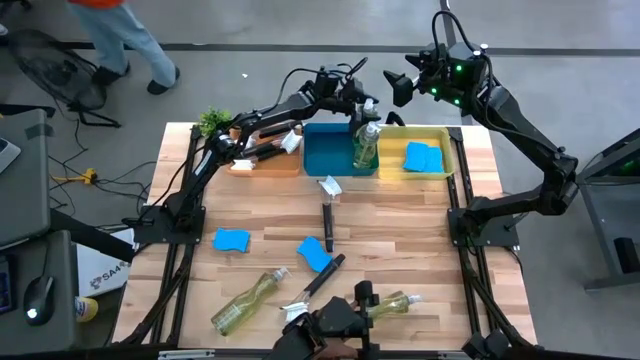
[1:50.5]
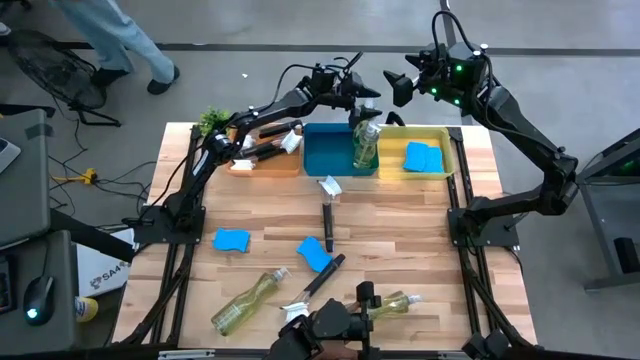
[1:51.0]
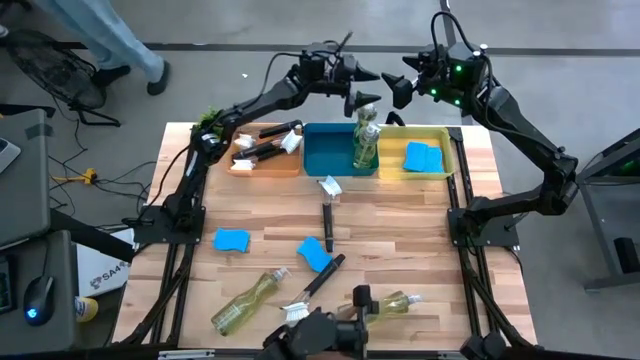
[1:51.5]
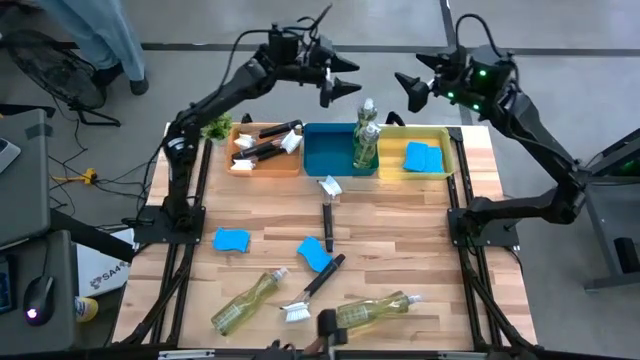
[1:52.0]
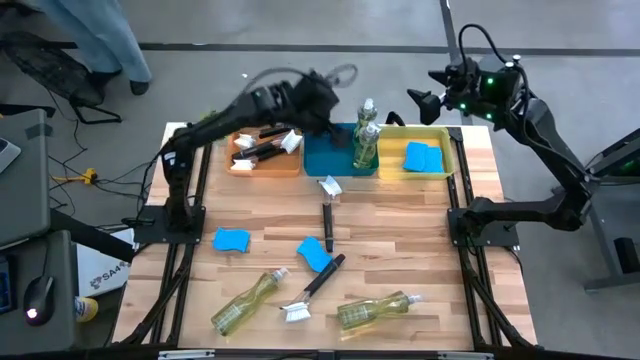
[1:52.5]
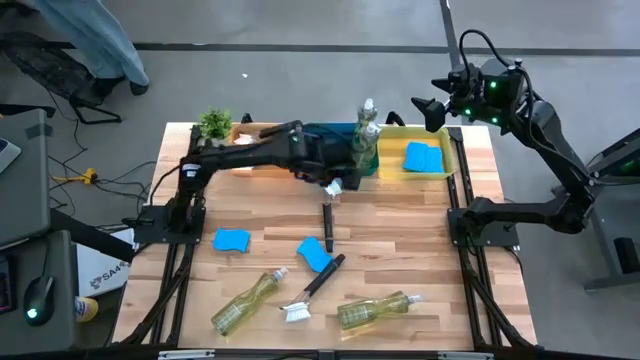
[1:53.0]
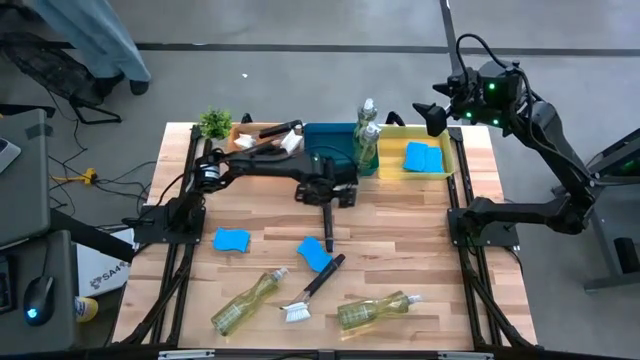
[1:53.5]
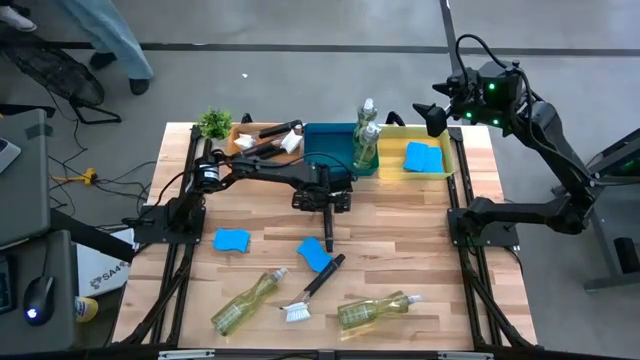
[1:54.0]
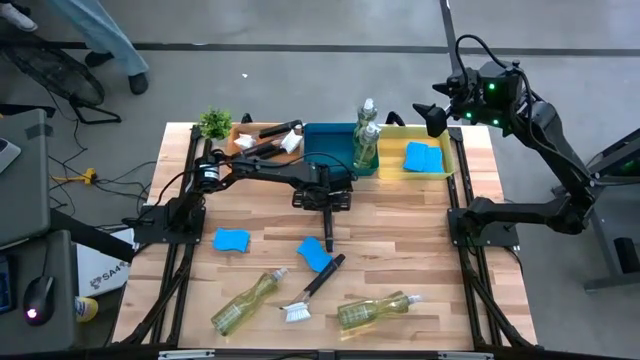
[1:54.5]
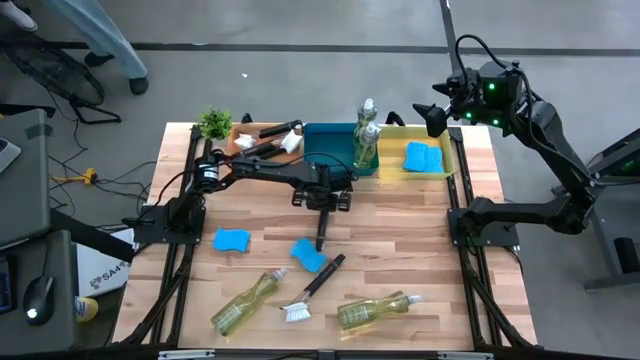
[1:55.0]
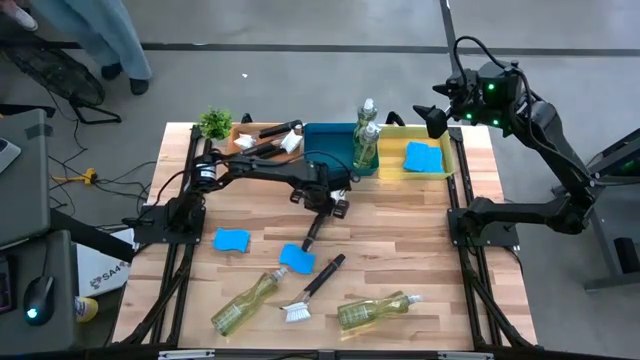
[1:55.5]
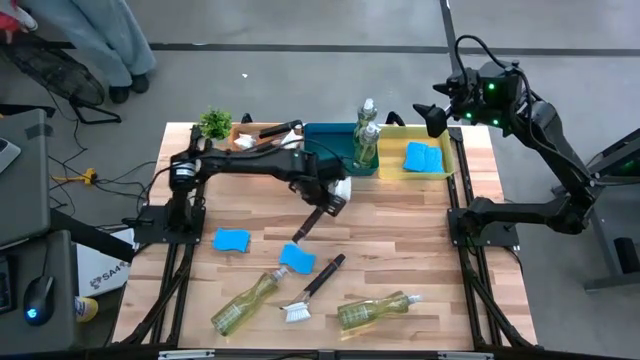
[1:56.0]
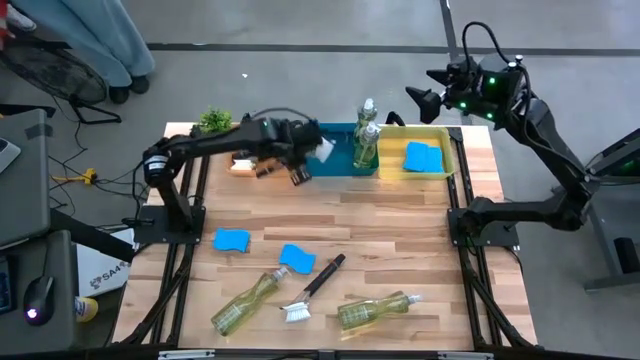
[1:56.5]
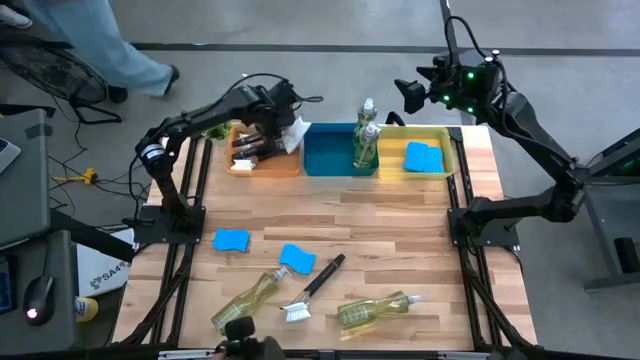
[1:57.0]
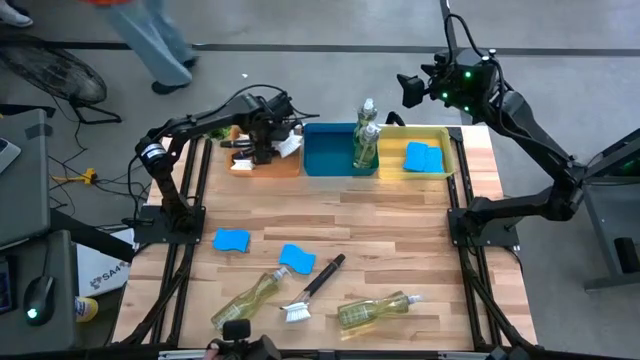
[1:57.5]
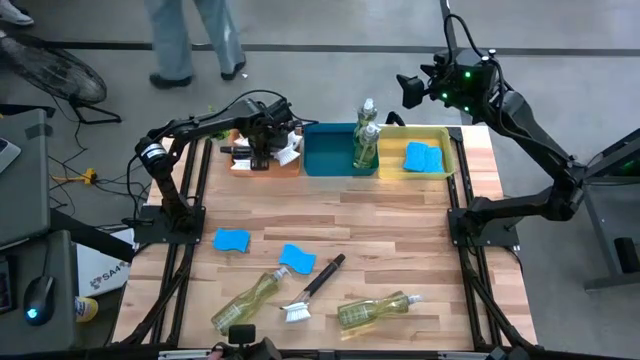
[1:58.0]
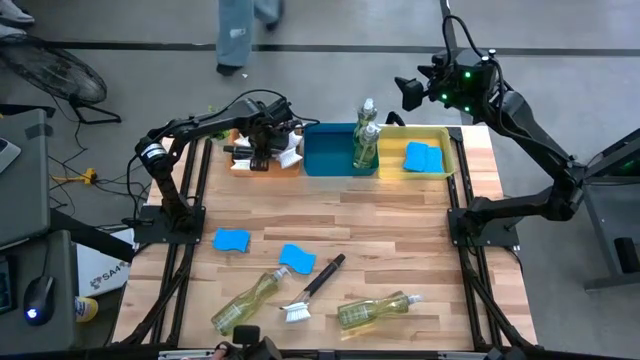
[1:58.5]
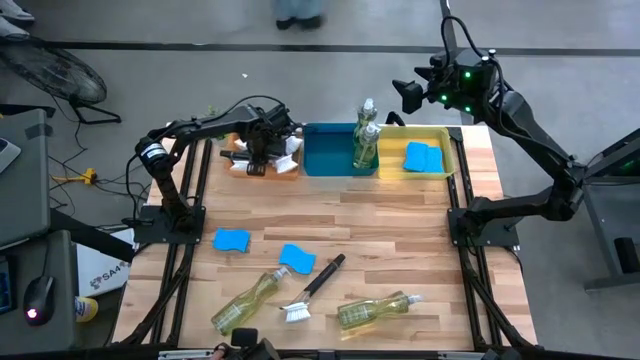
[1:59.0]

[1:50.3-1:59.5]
Task: Pick & Place Kitchen Sink Supplies
Put the cleaning brush into the orange bin

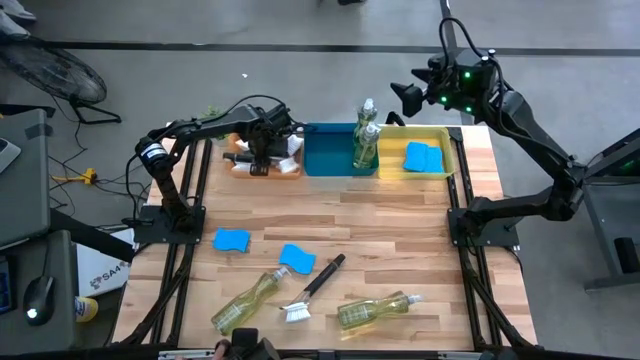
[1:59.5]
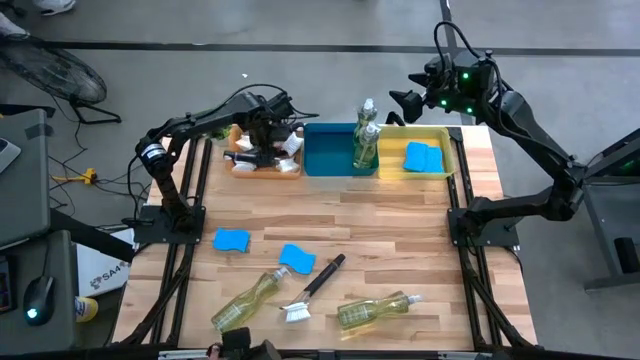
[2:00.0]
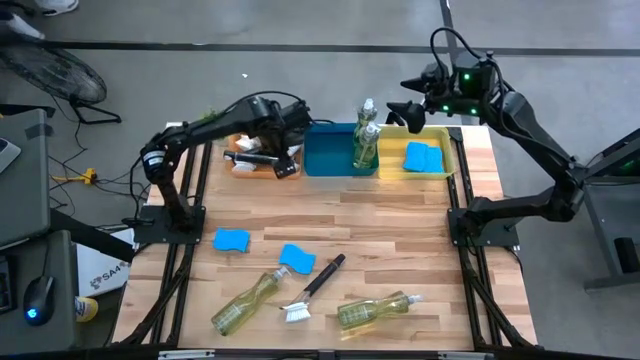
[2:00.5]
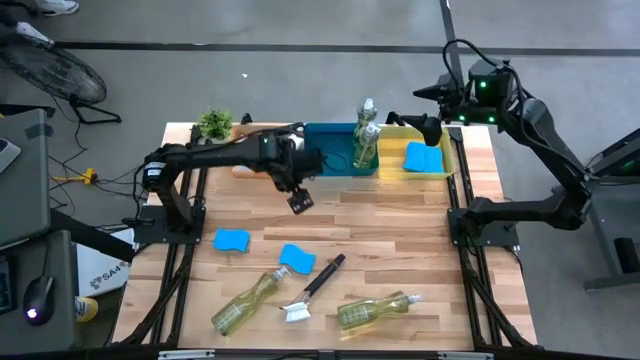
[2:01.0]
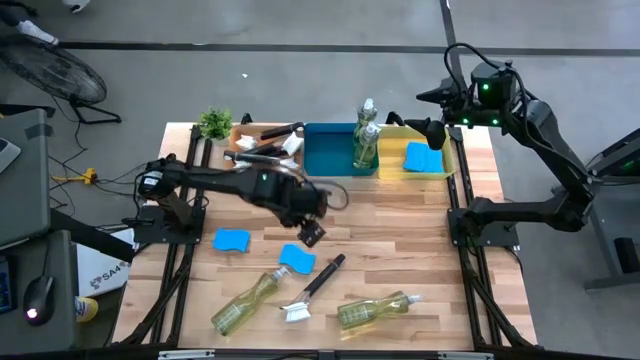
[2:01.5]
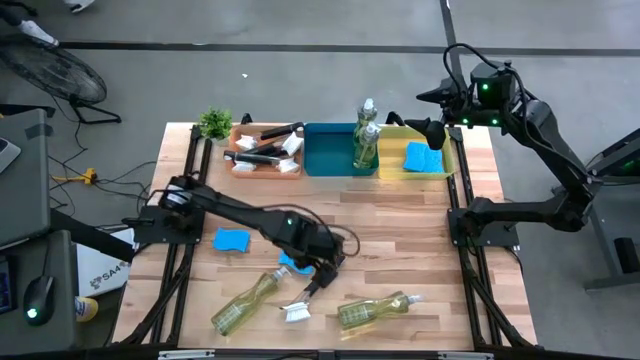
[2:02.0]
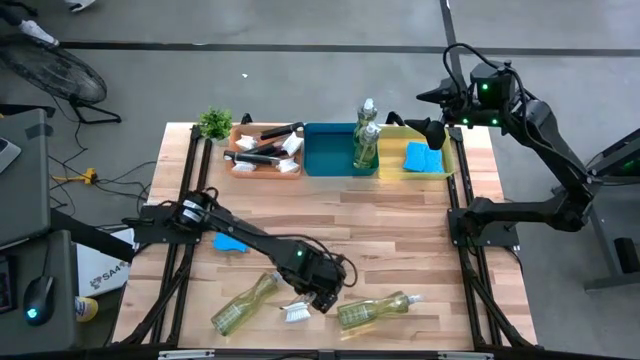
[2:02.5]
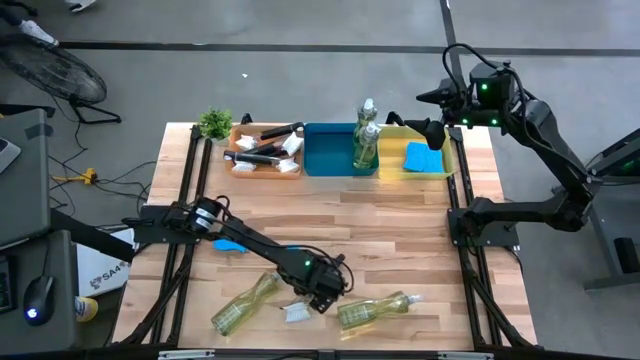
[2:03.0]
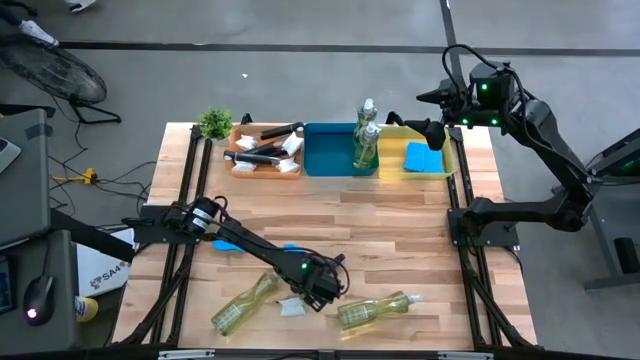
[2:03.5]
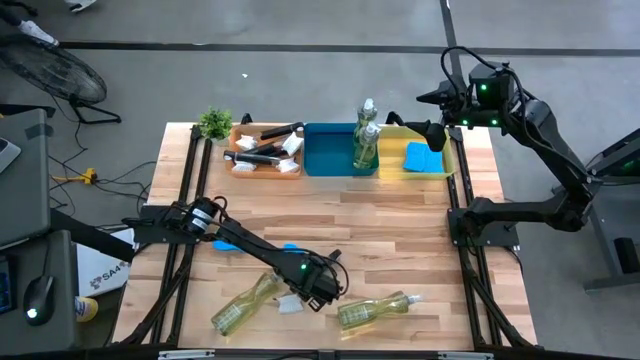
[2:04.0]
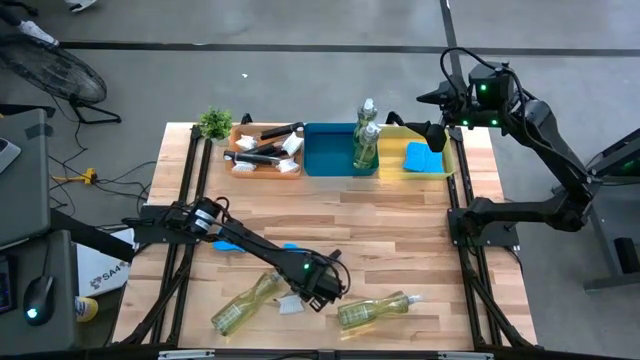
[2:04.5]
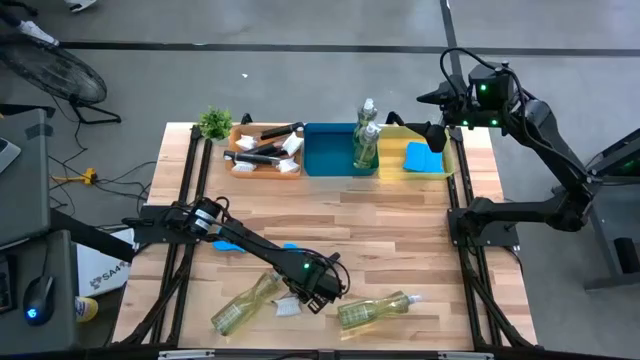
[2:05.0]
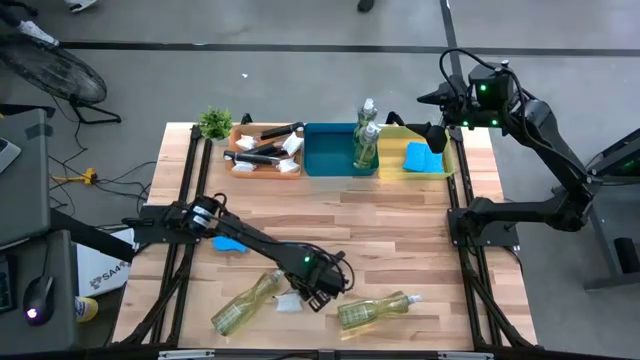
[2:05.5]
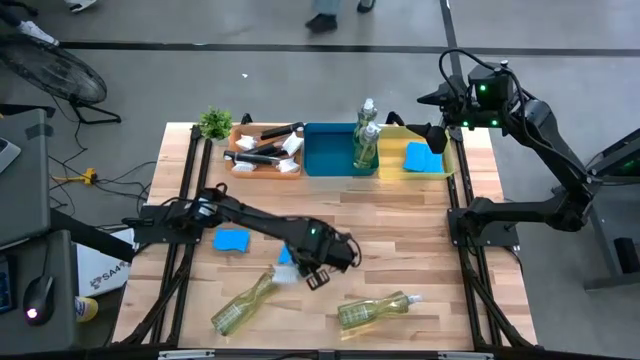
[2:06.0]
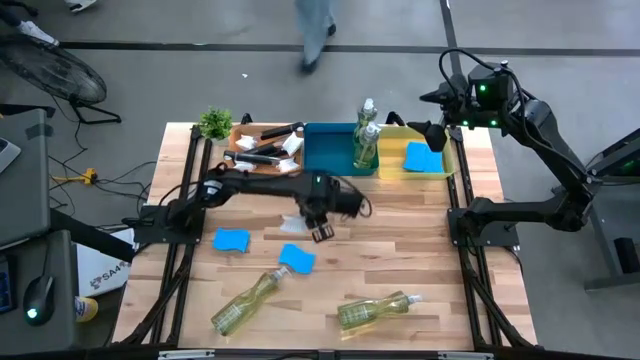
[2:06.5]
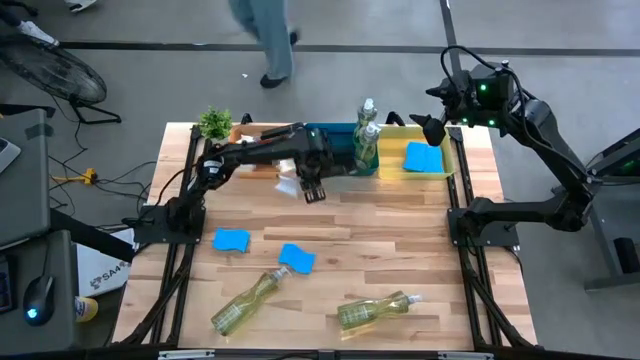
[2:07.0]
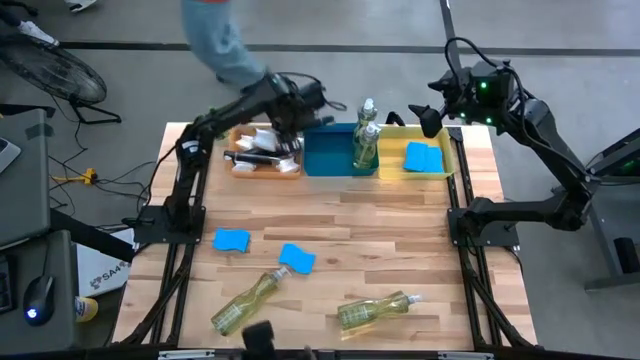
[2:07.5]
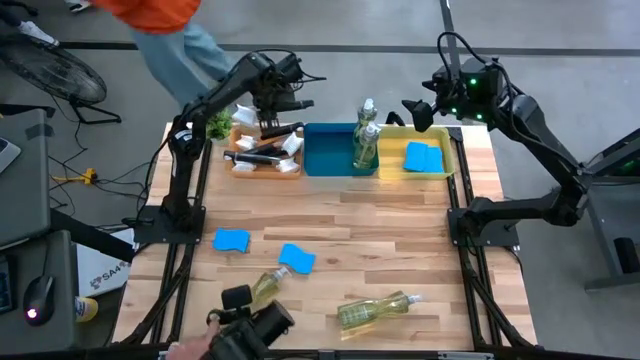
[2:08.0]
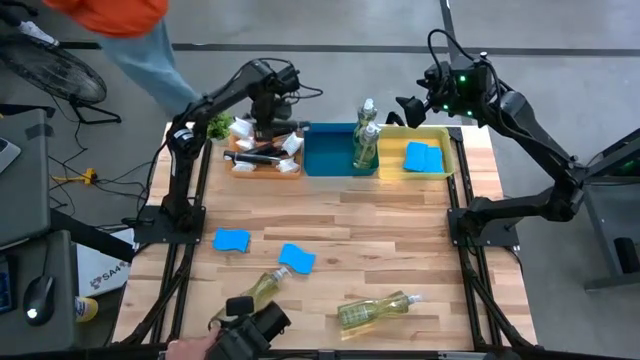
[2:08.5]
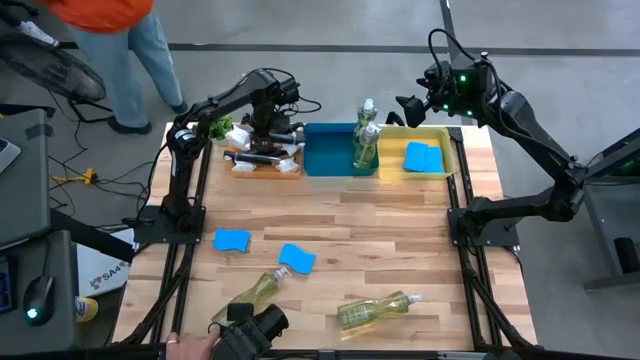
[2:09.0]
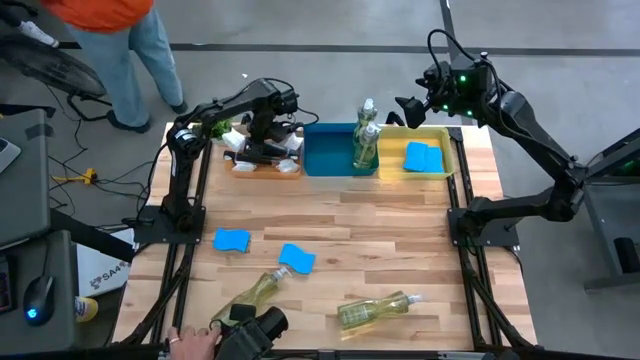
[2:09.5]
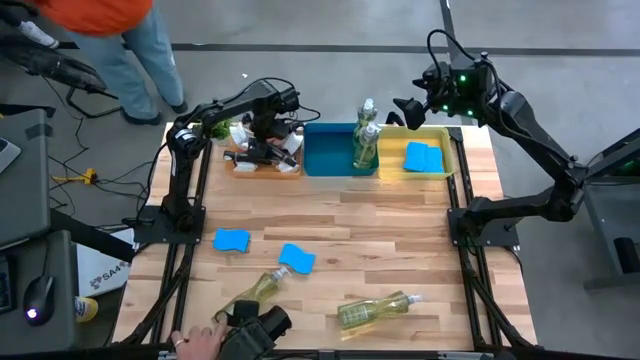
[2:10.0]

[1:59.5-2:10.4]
Put the cleaning brush into the orange bin
